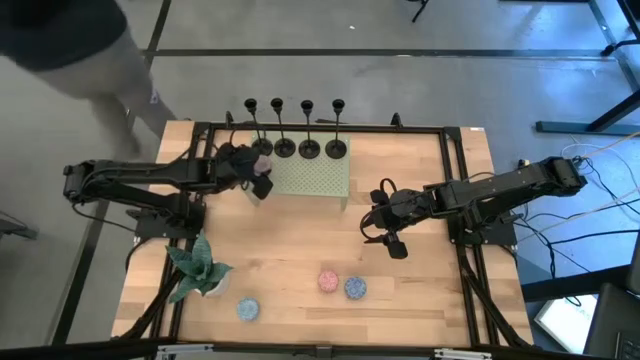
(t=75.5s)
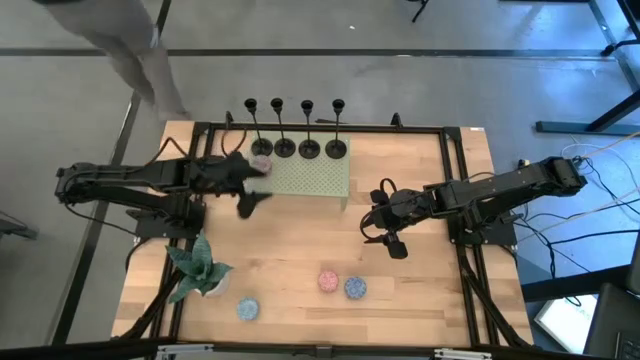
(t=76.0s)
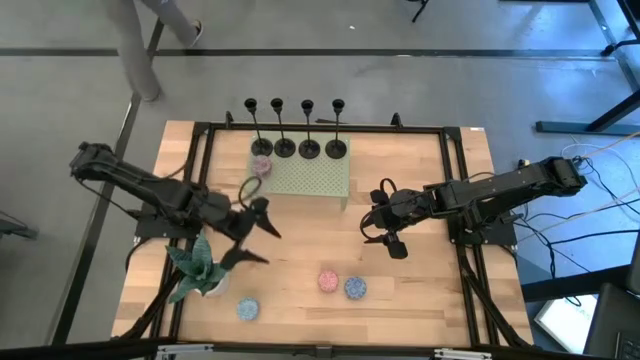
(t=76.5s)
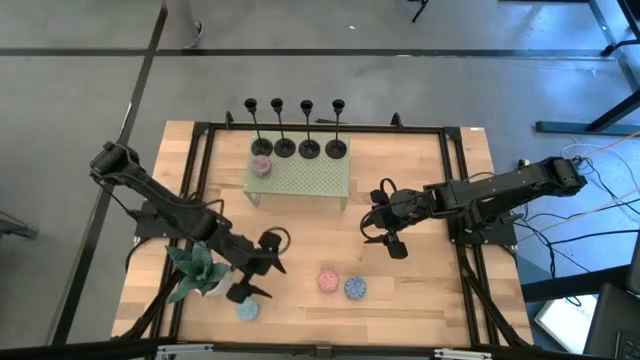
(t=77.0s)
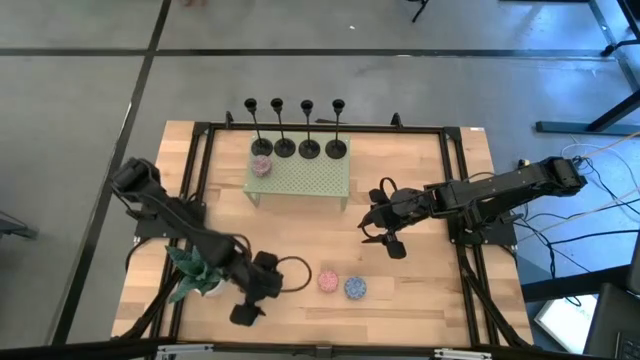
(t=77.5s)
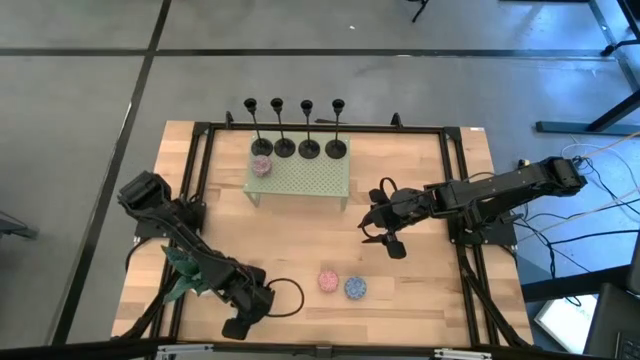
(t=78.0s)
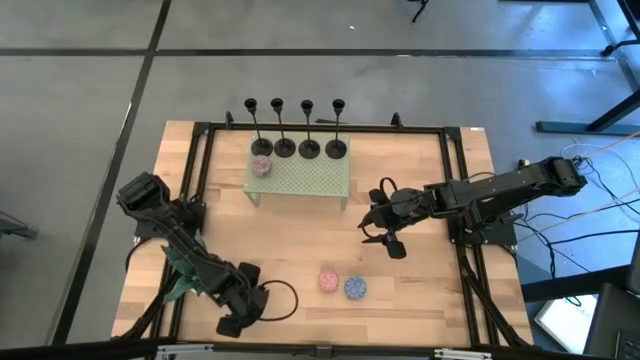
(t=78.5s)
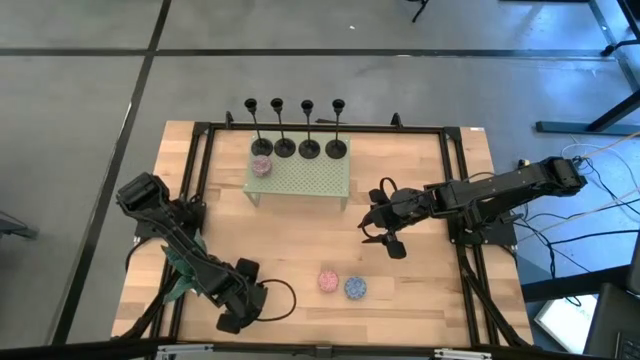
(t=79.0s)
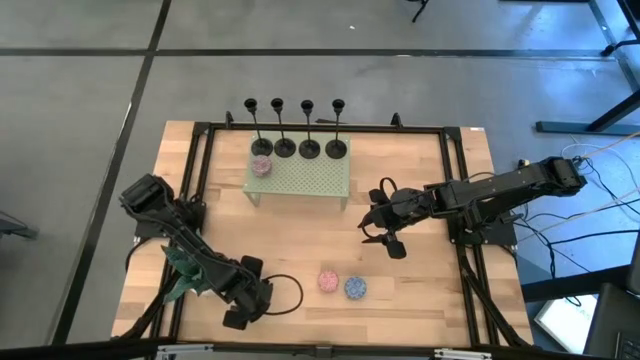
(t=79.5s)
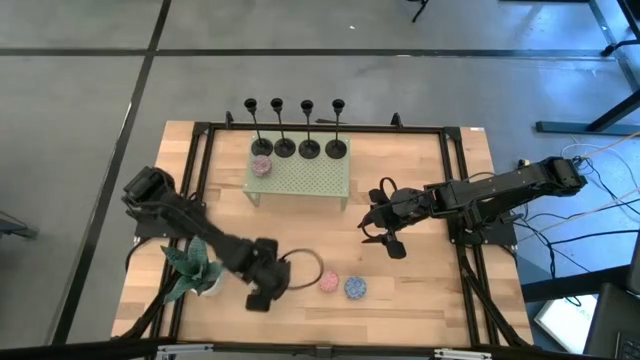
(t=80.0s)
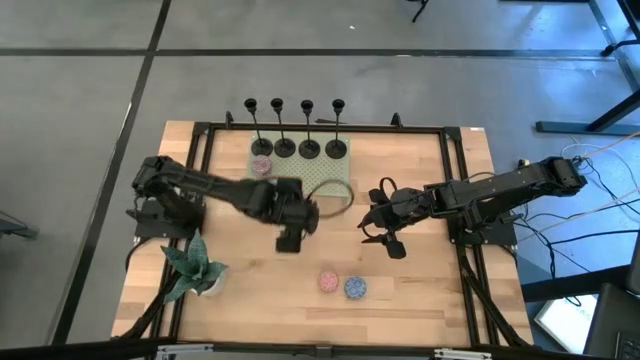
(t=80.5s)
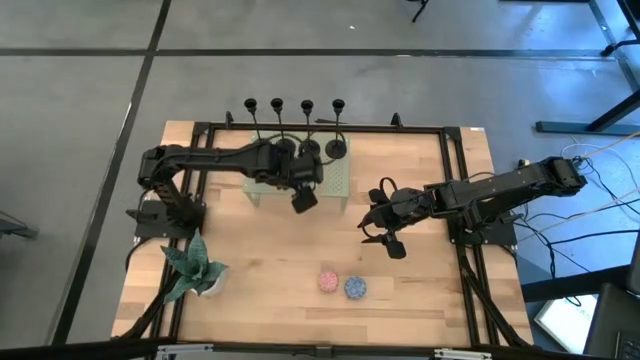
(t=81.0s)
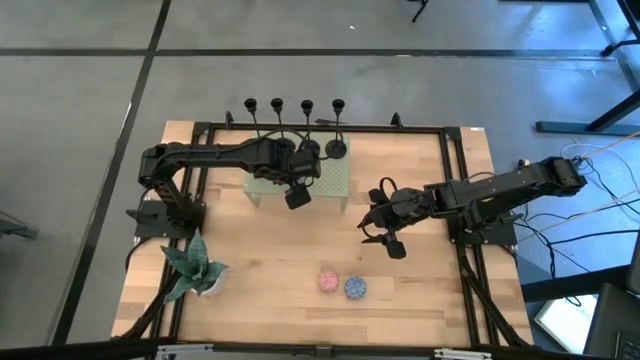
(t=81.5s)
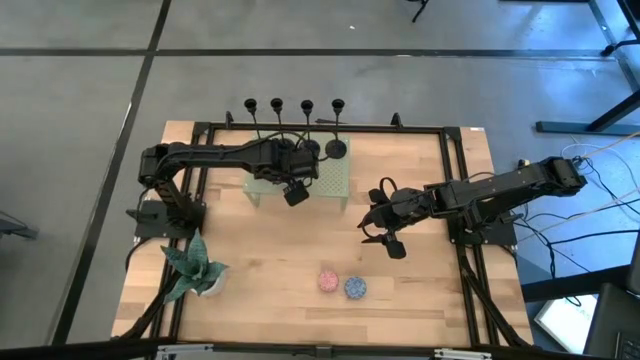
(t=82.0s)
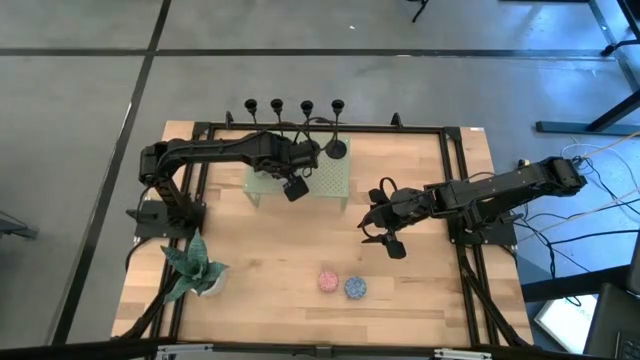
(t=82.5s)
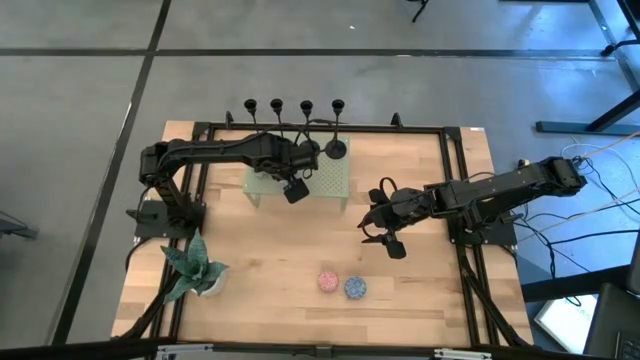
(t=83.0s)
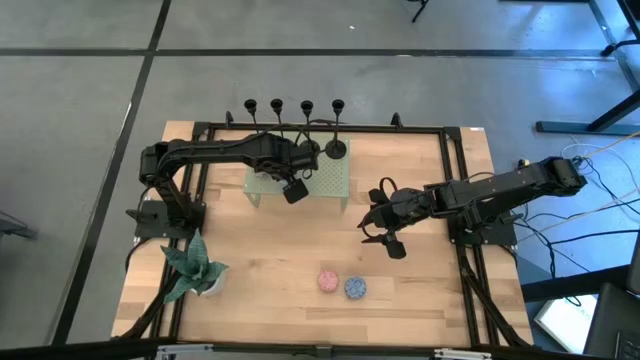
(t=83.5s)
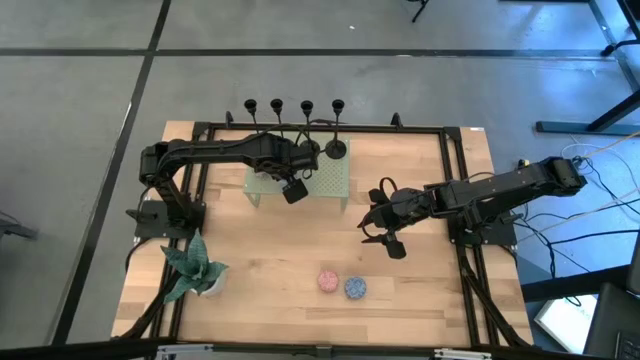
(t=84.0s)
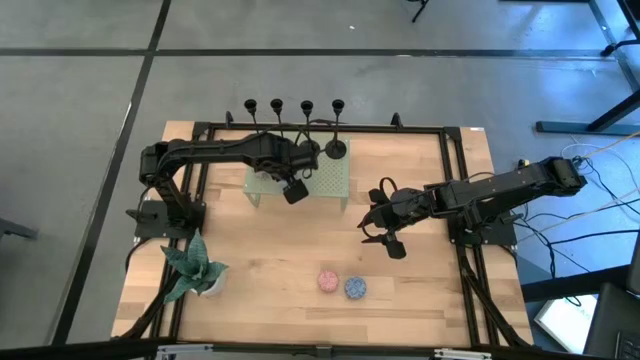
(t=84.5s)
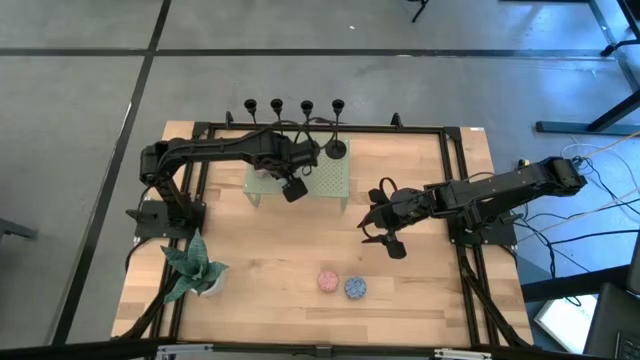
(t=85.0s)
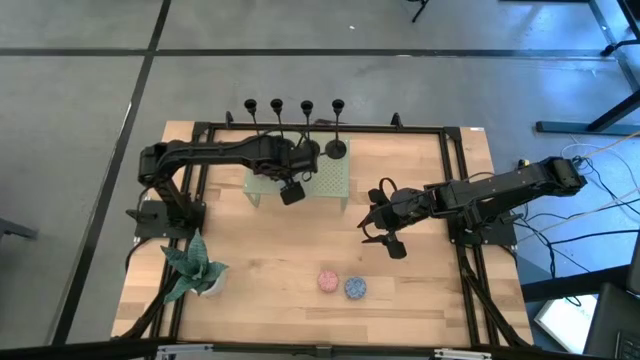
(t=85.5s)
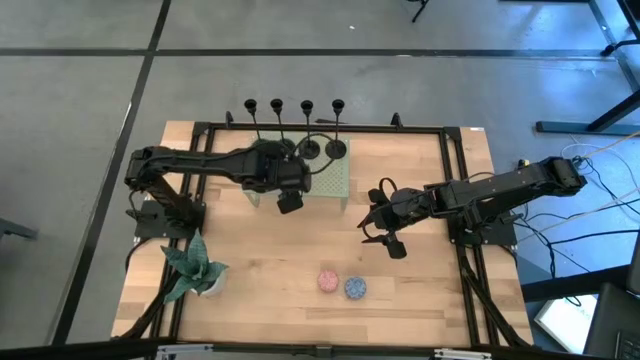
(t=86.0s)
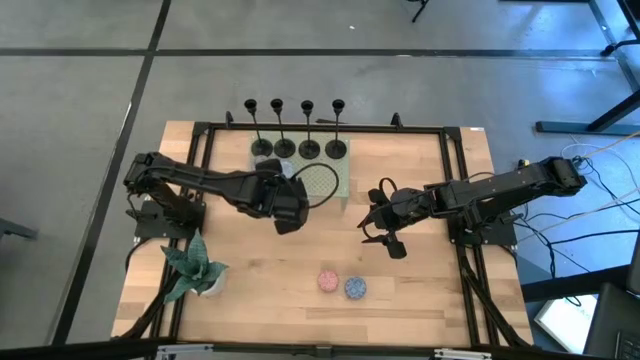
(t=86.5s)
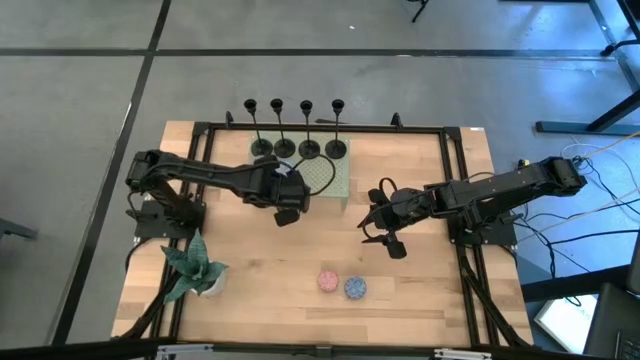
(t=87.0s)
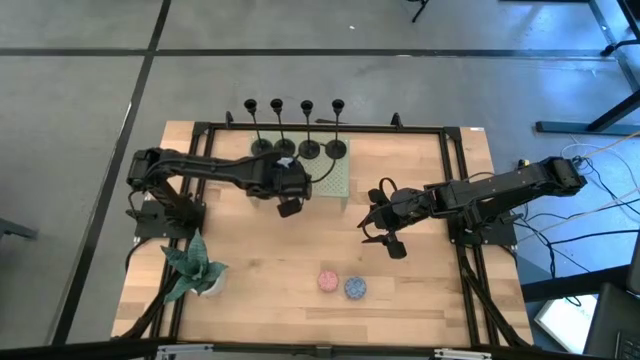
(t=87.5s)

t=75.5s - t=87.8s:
Task: Pick & Place candle stick holders
Align the light blue scented candle with the red scented candle on the shelf

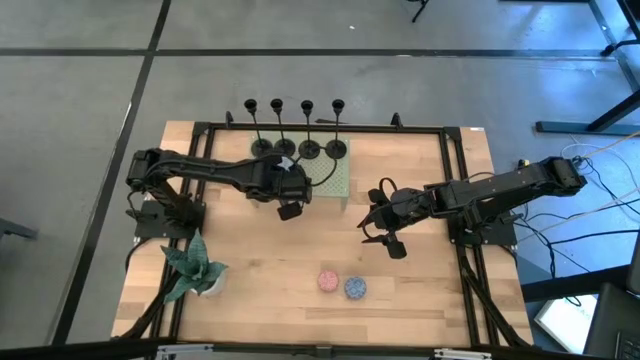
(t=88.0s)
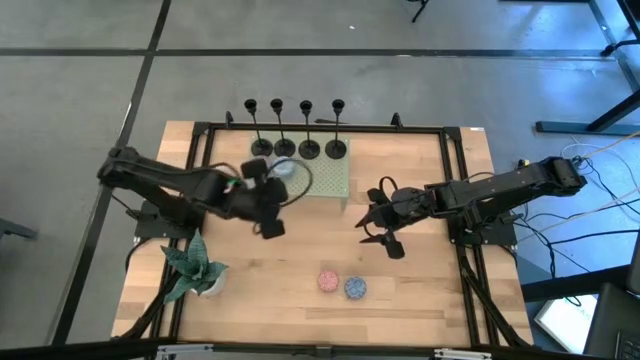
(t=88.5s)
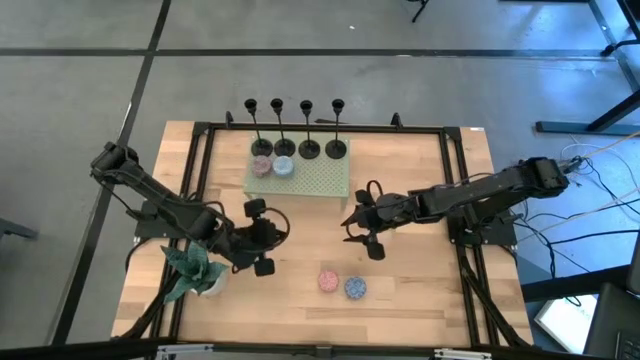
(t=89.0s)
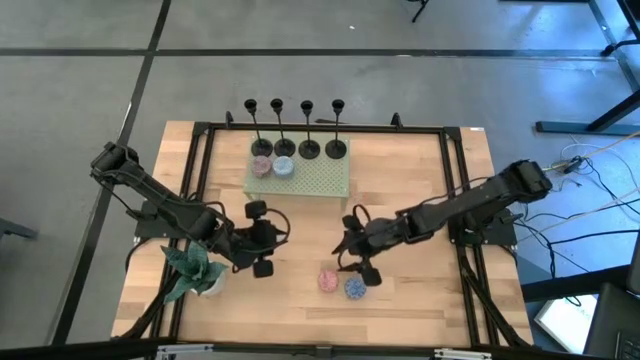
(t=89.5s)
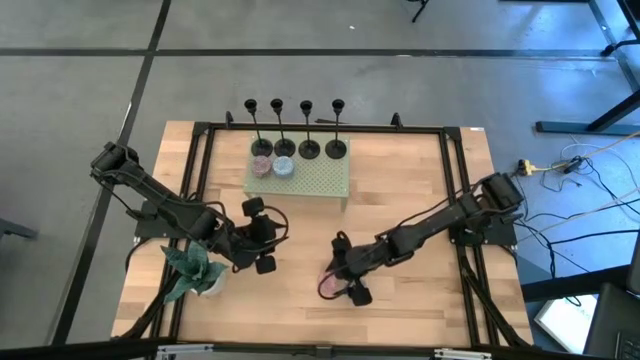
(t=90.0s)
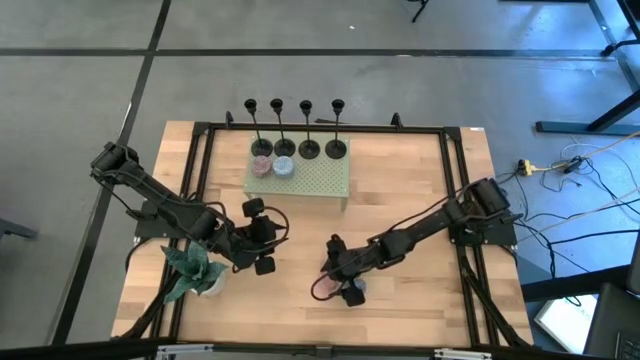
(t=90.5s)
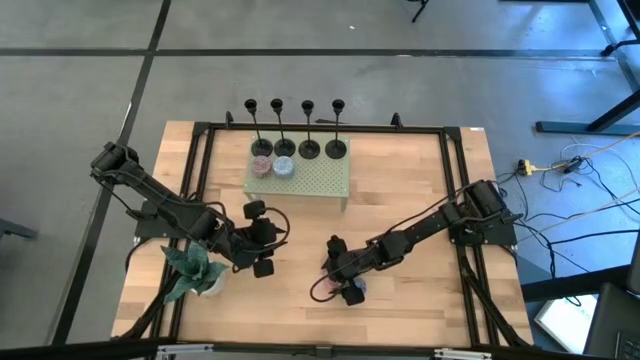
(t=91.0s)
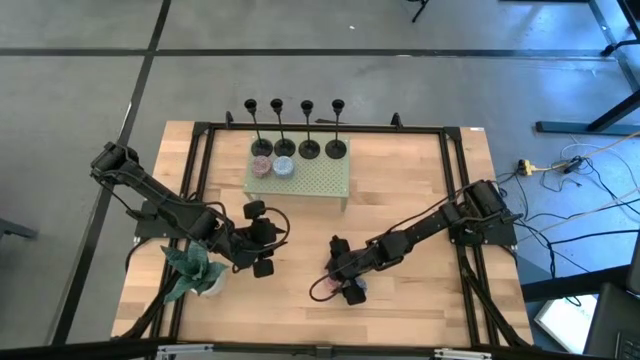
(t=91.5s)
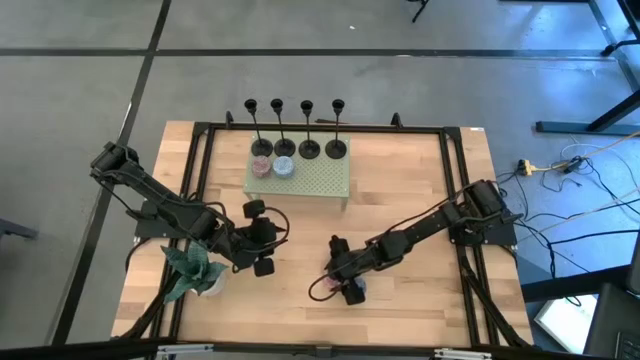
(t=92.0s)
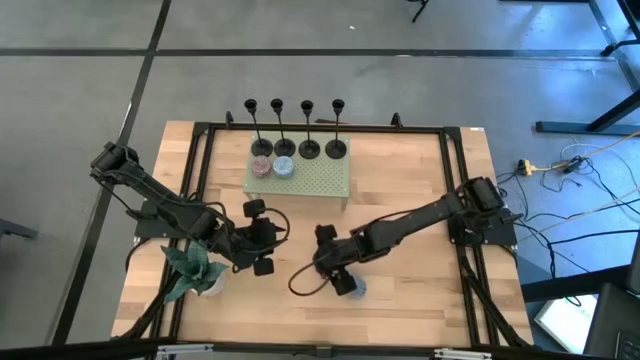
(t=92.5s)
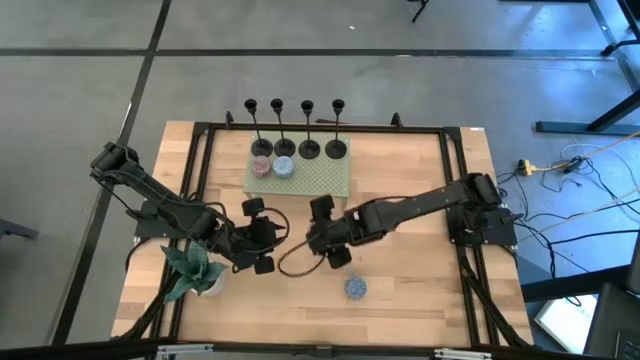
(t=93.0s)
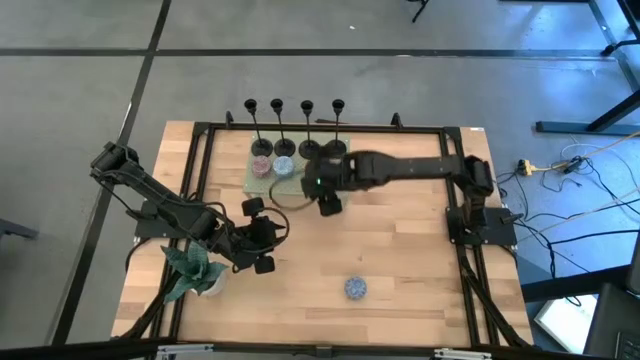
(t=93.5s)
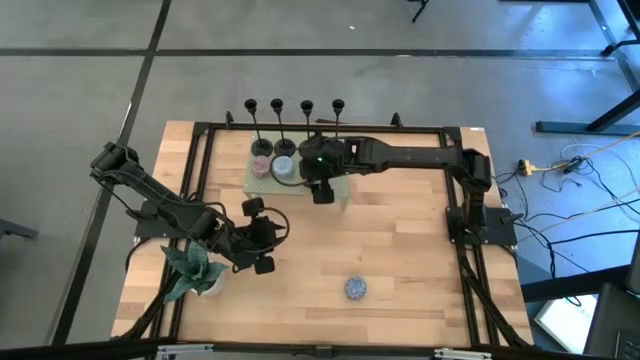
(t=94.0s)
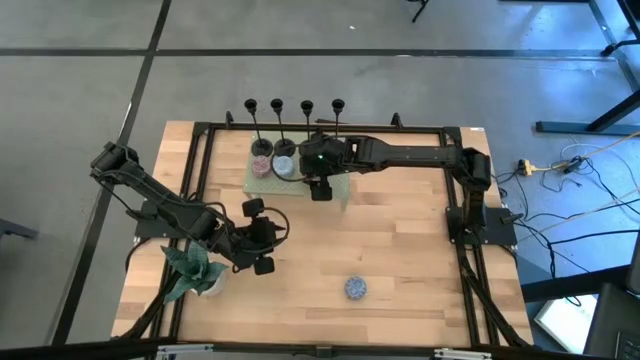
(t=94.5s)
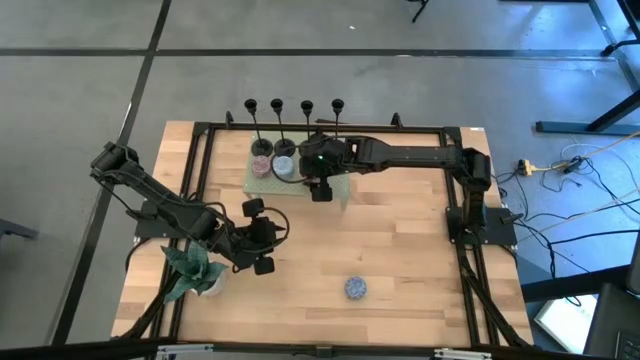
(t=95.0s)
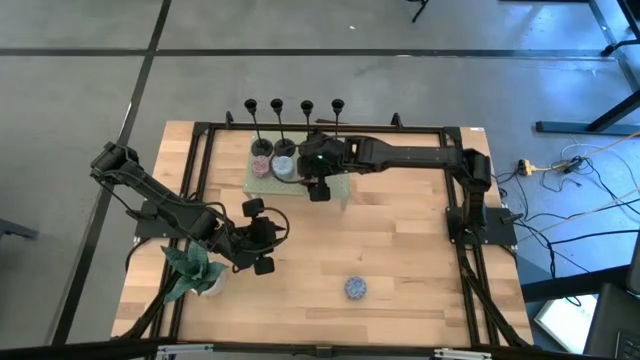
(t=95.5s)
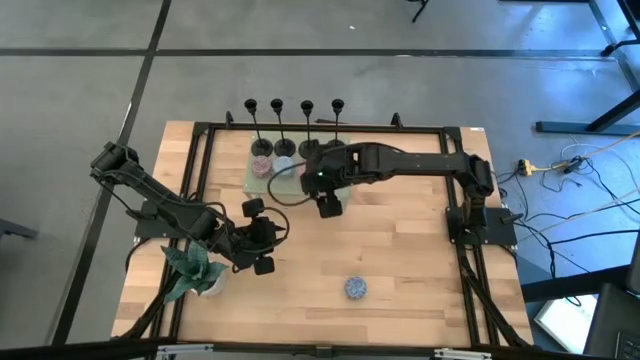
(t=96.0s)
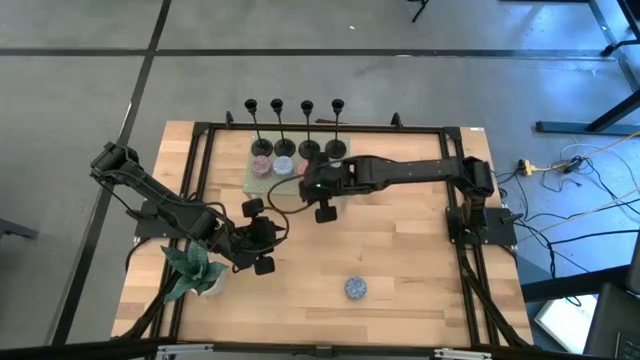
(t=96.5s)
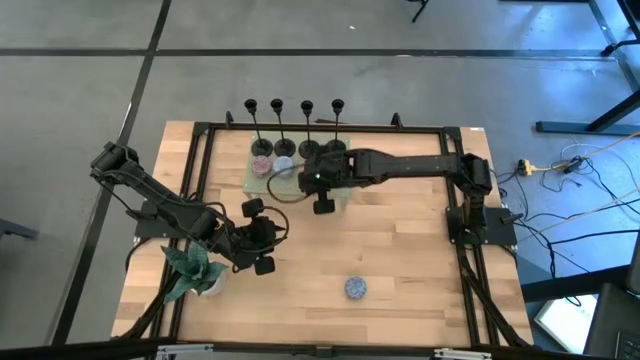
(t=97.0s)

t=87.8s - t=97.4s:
Align the pink scented candle with the light blue scented candle on the shelf
